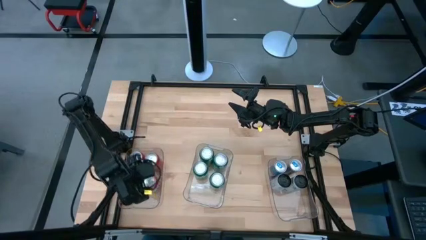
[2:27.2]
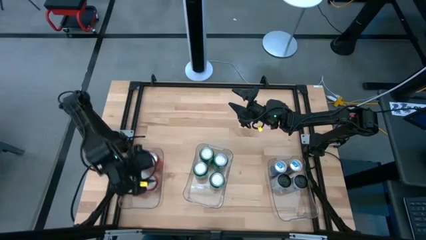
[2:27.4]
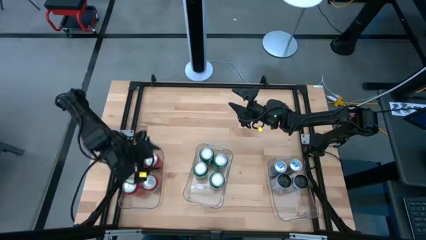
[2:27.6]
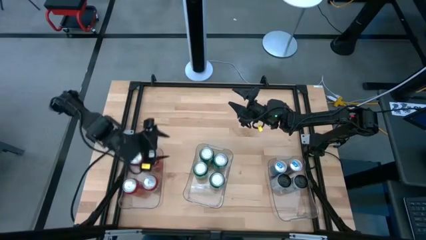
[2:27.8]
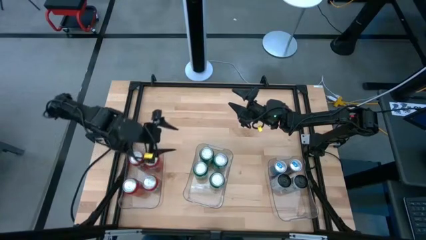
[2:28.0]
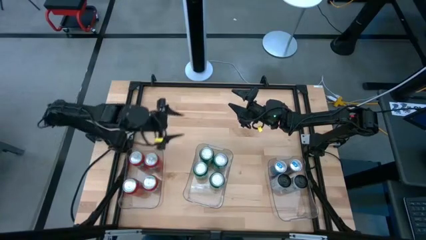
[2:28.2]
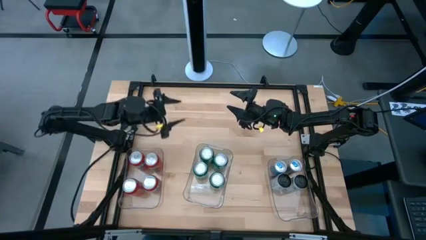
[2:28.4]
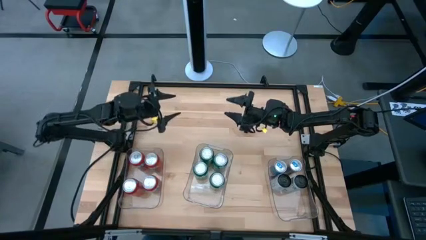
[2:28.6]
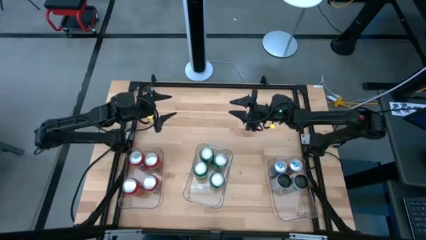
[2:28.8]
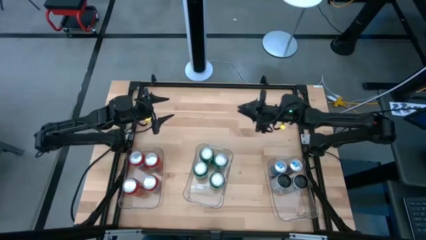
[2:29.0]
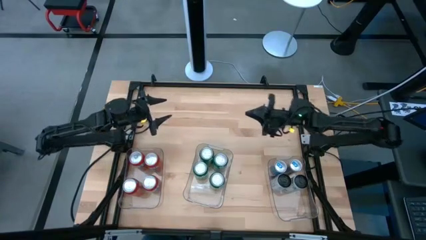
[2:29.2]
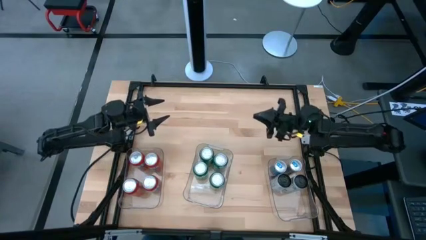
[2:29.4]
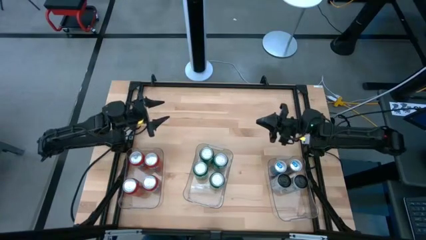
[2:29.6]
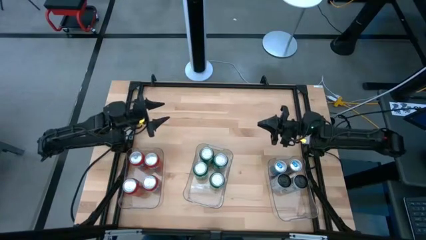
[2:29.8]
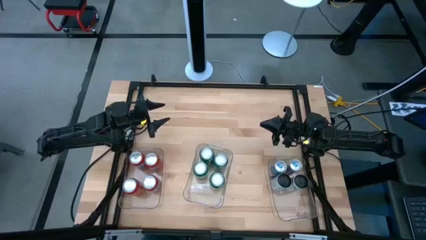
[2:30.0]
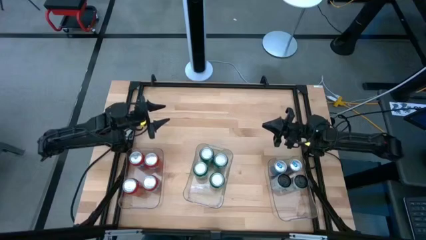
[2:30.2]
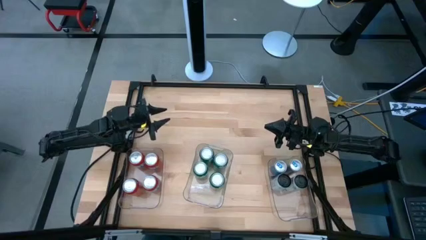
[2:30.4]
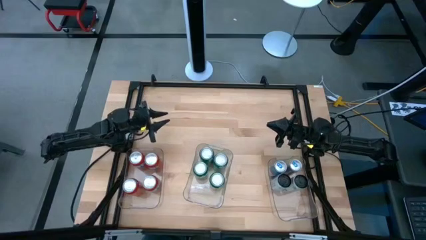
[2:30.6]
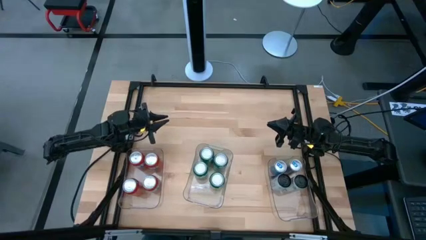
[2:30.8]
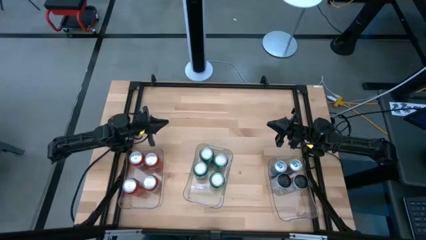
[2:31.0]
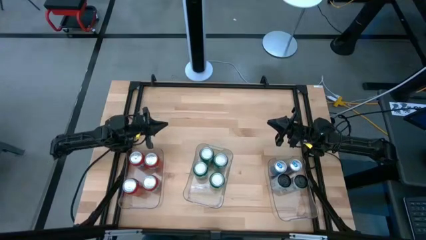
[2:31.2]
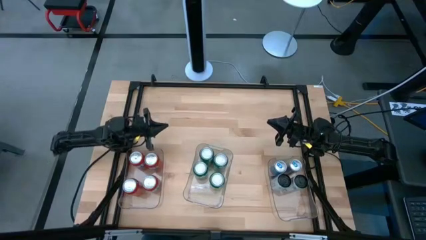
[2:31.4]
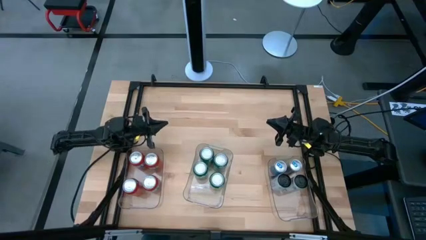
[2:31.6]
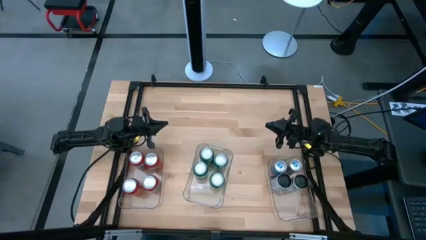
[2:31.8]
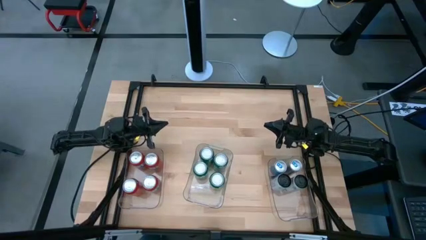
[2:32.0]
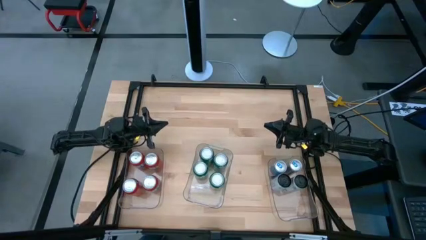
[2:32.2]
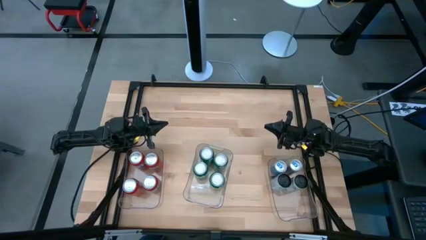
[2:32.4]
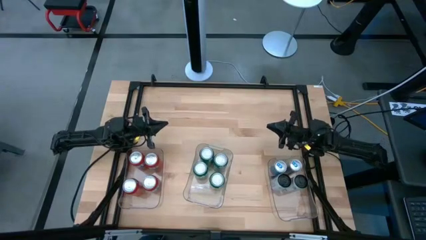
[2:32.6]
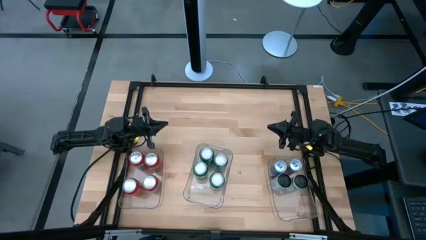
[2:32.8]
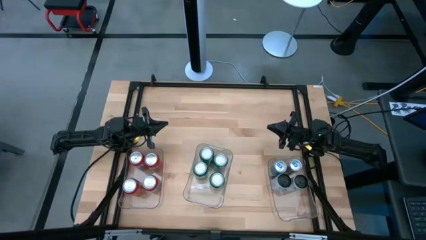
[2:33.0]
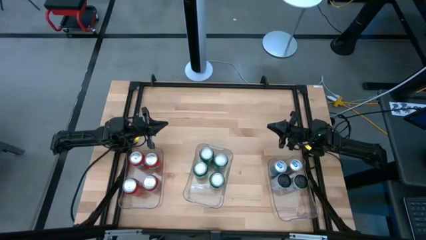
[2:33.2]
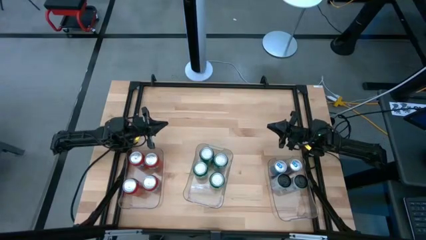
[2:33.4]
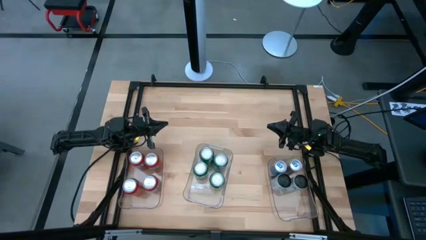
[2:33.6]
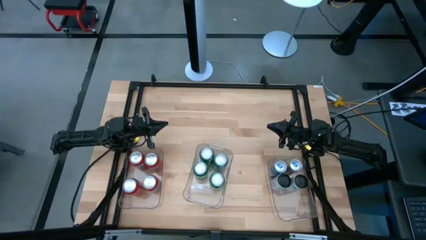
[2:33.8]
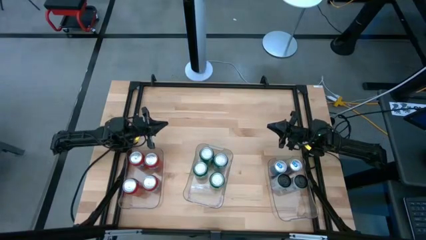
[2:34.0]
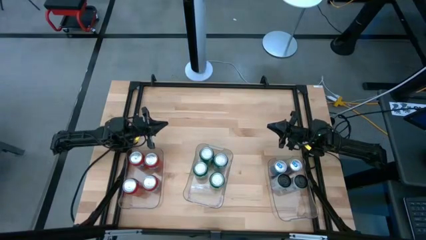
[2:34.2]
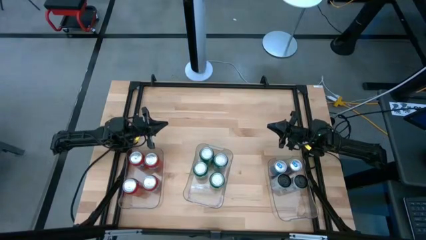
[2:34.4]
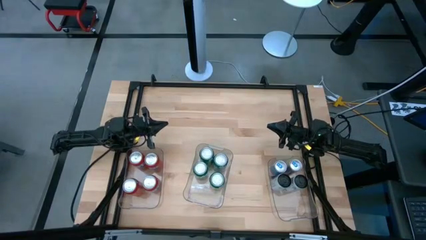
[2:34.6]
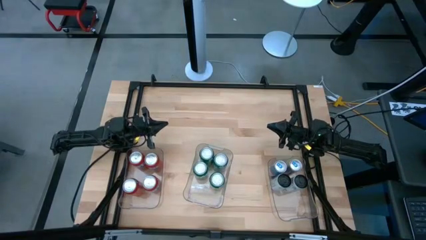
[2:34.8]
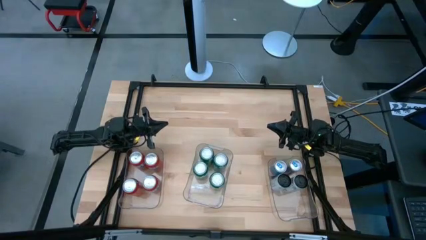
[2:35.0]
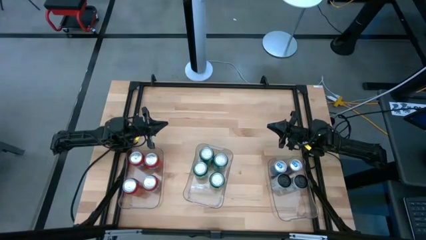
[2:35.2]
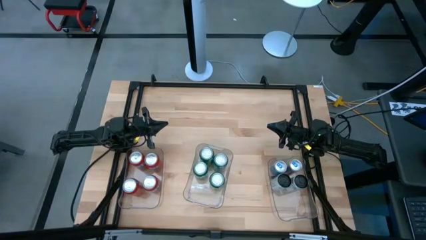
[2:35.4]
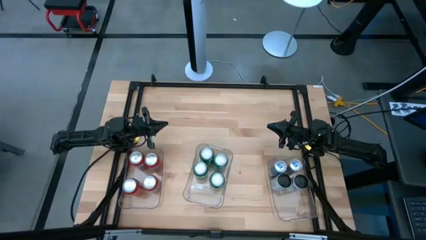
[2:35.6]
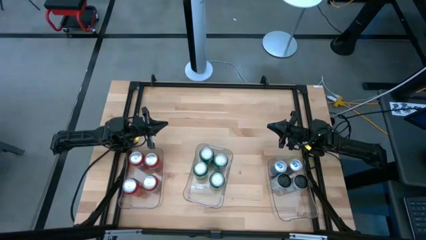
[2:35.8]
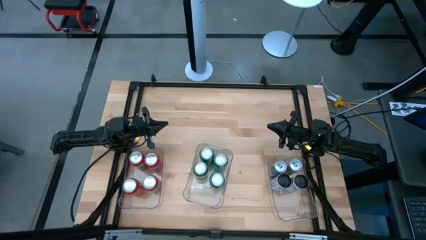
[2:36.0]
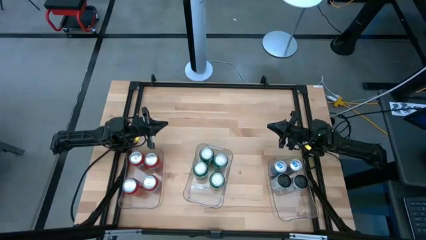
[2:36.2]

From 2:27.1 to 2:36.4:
Task: Sort soda cans
Return to Home Position
